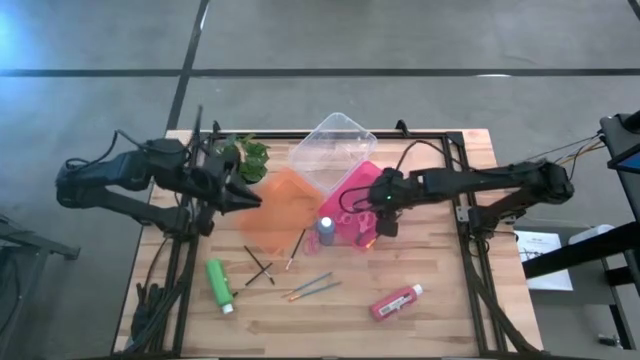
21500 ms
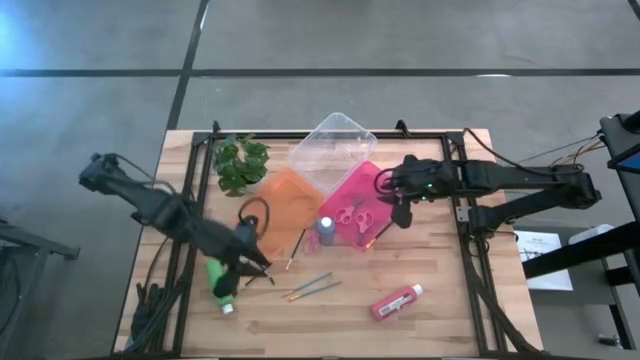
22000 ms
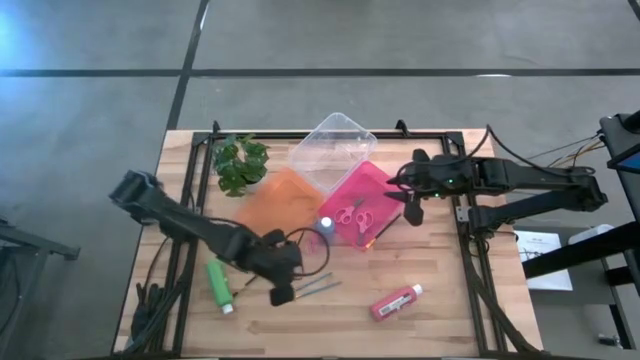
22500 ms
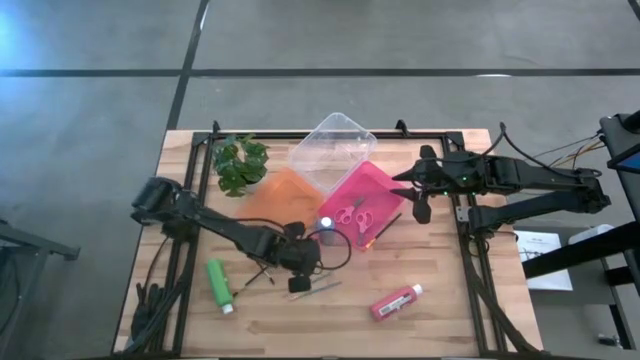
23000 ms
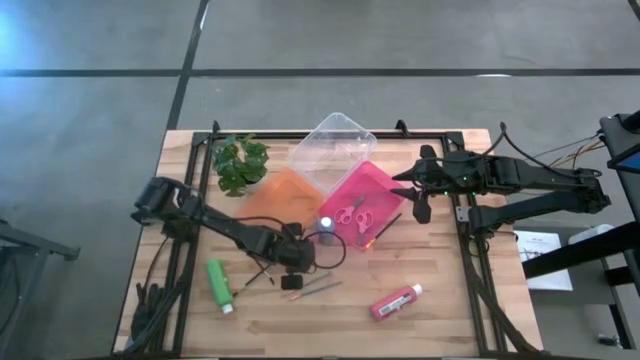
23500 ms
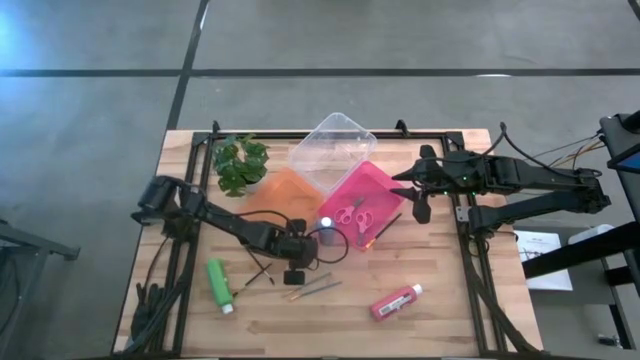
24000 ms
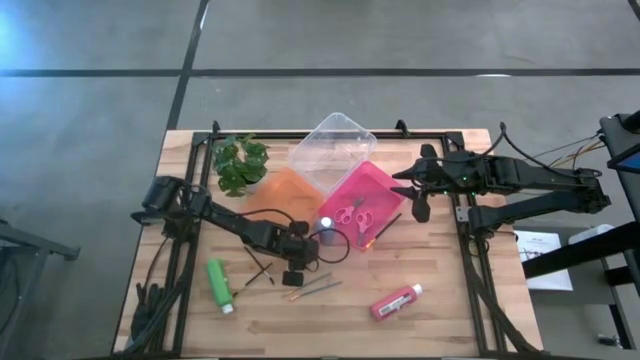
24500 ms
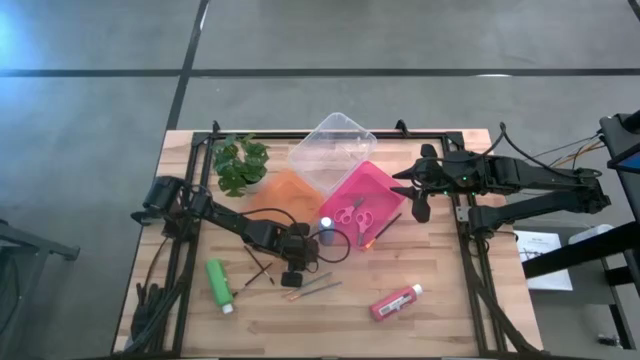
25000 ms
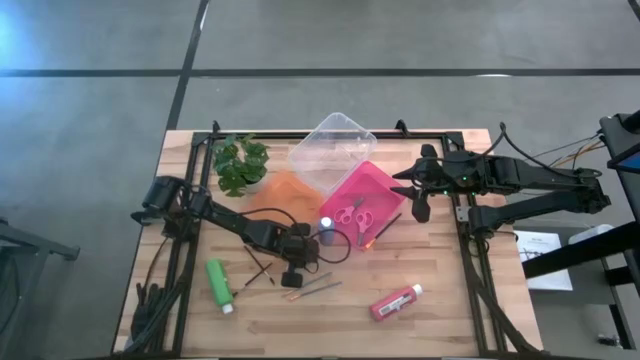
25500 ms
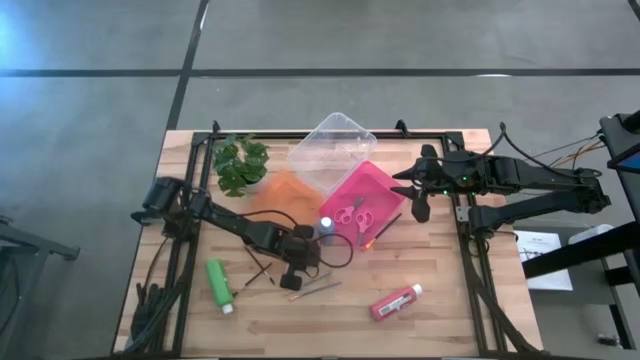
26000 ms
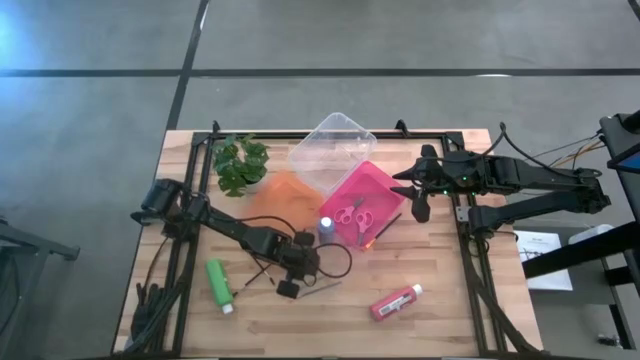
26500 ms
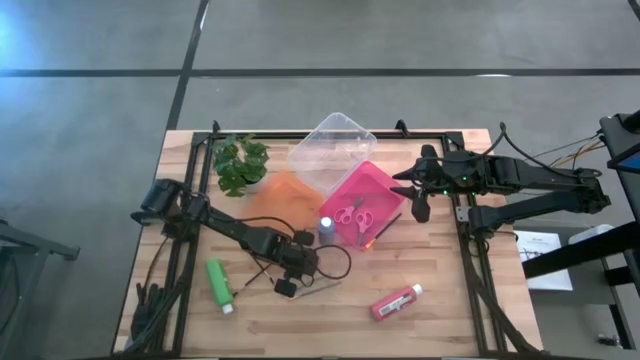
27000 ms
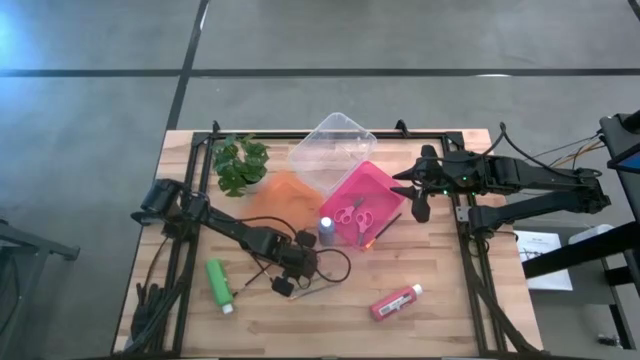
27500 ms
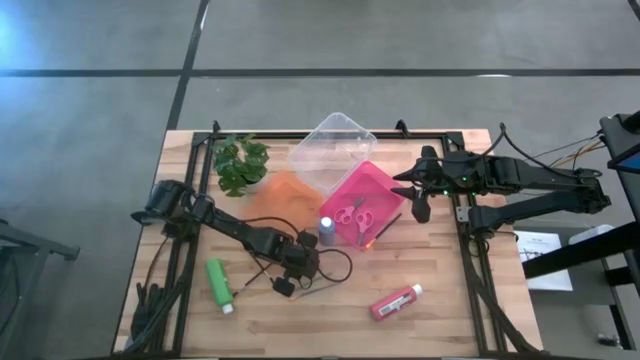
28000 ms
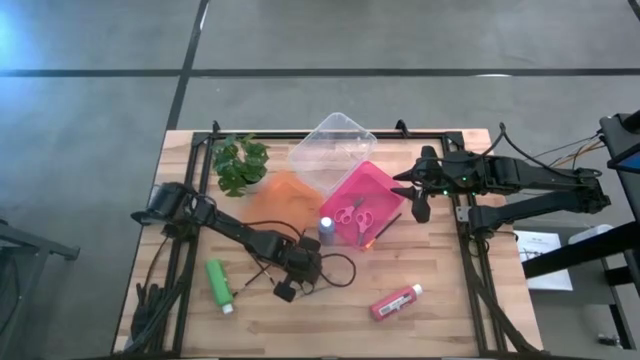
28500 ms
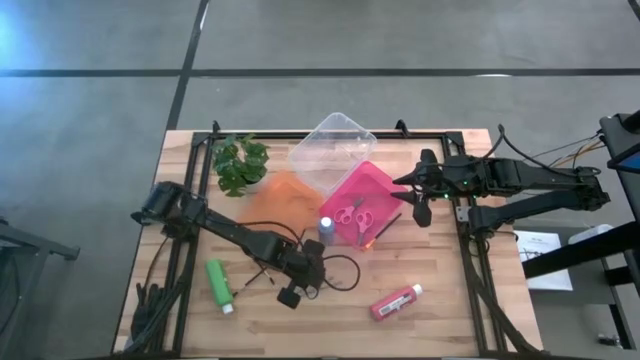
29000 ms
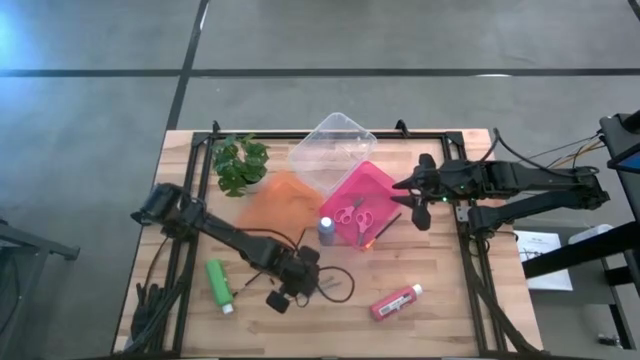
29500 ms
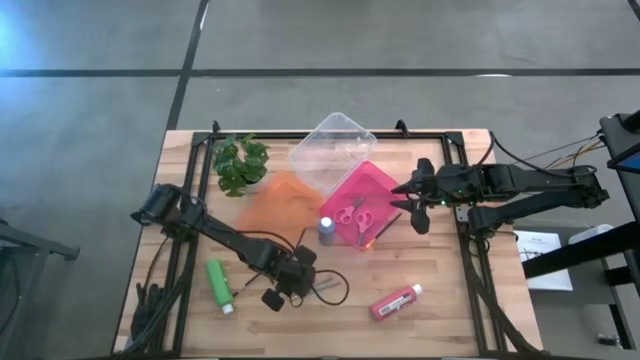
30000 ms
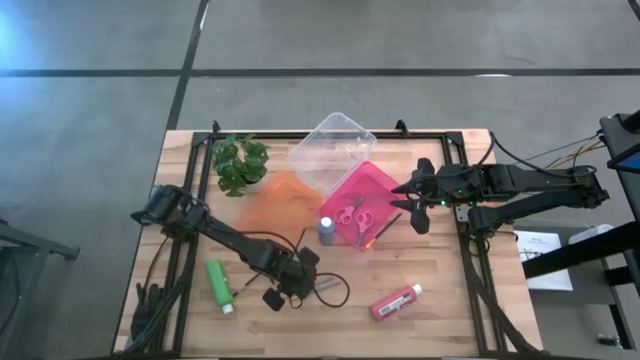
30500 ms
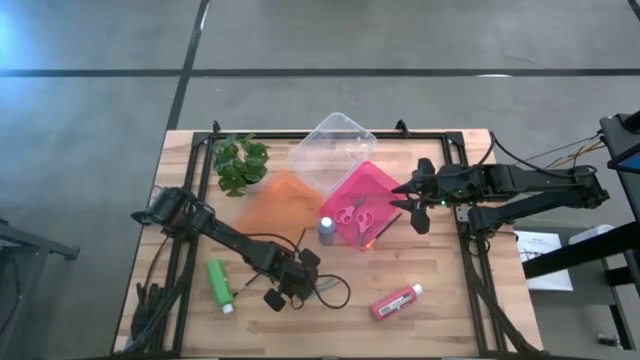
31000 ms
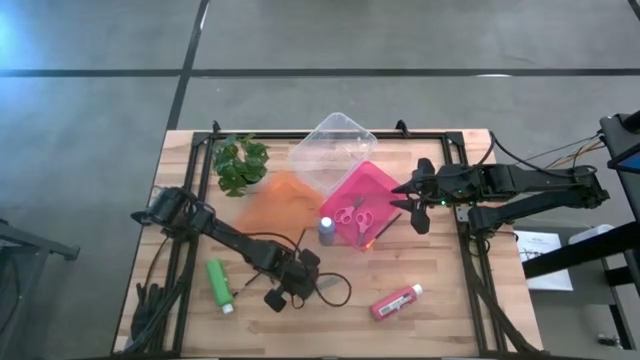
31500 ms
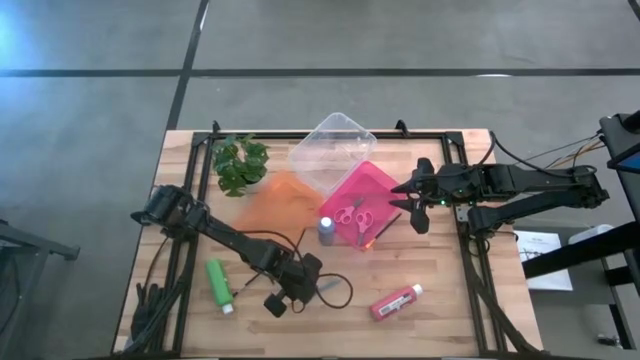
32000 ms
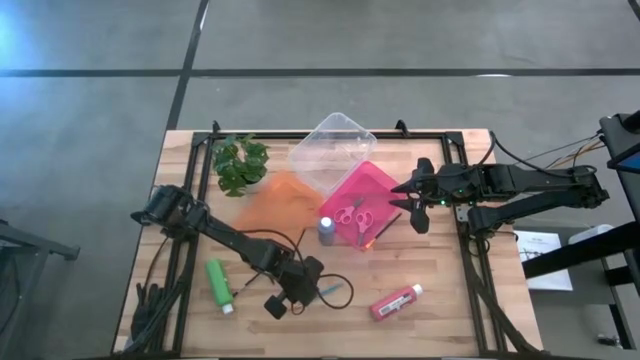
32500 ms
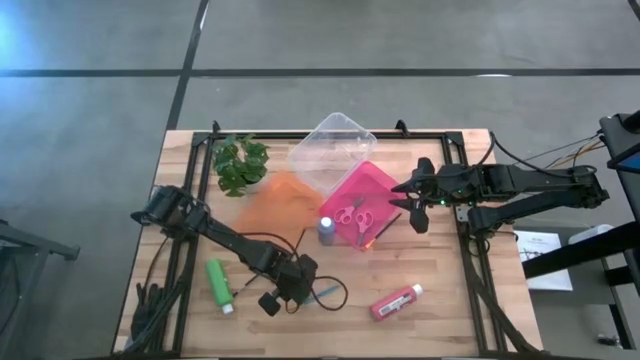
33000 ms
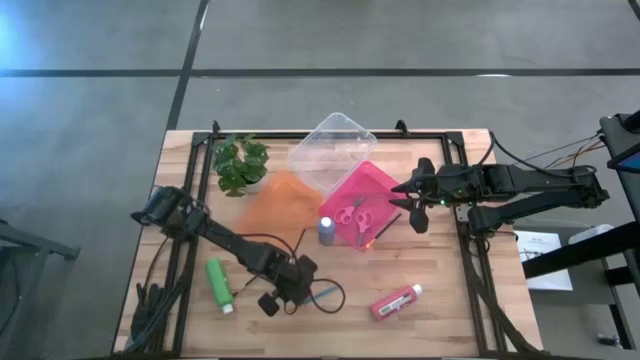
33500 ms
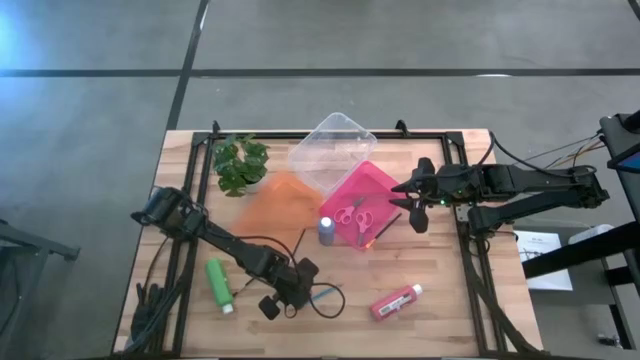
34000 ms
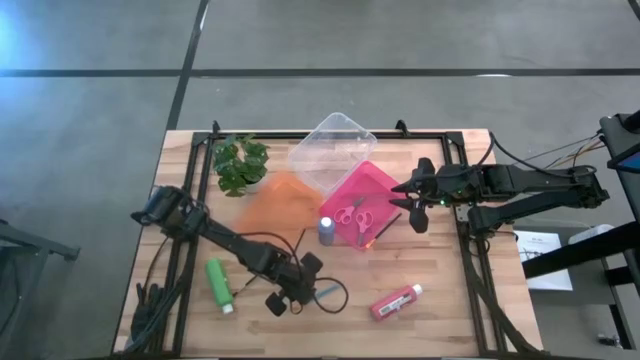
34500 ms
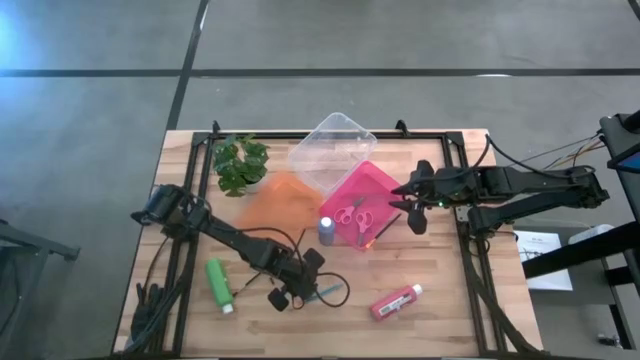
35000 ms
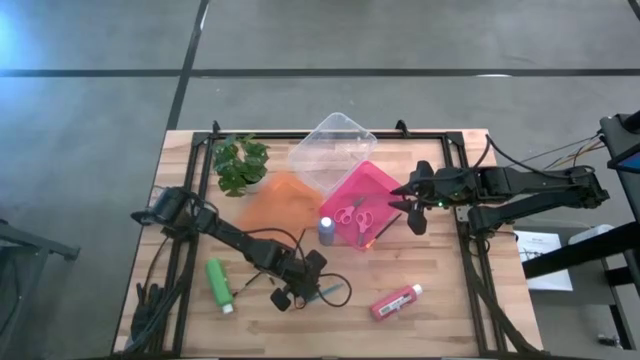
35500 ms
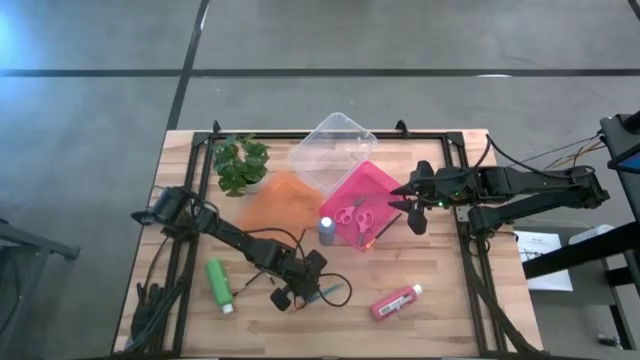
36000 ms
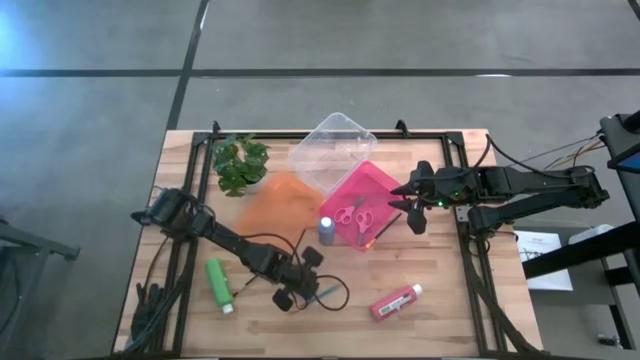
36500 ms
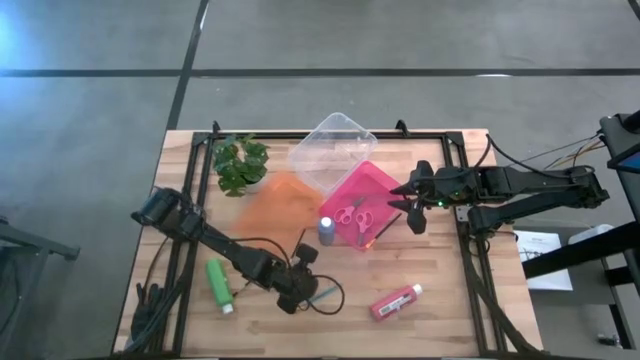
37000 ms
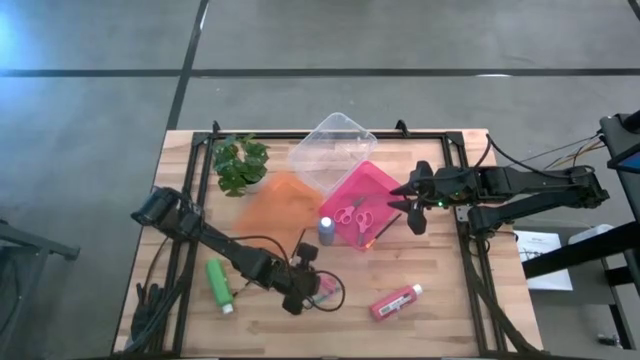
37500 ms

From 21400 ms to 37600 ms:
Task: Pick & Place Paint Supplies
Put the pink scissors into the pink bin

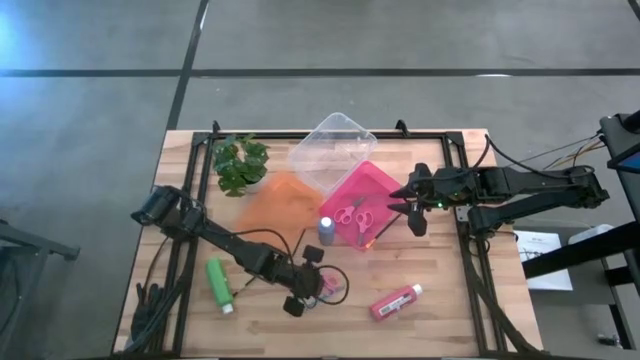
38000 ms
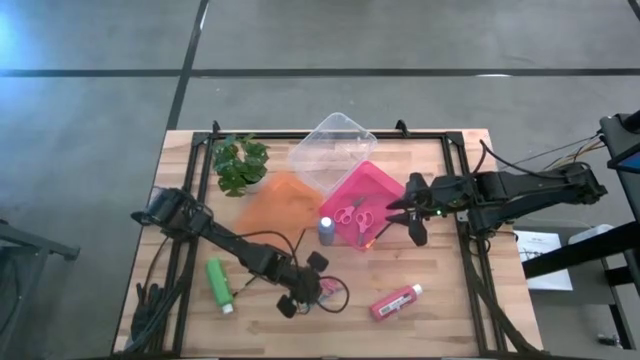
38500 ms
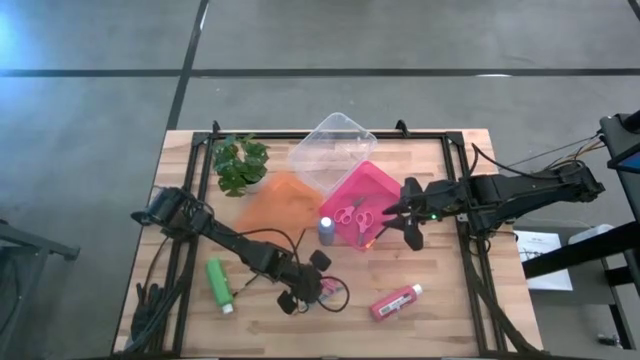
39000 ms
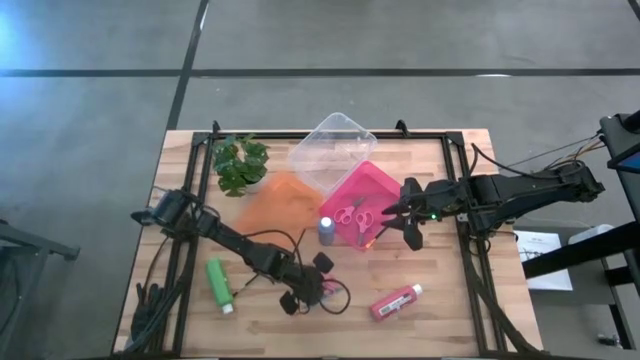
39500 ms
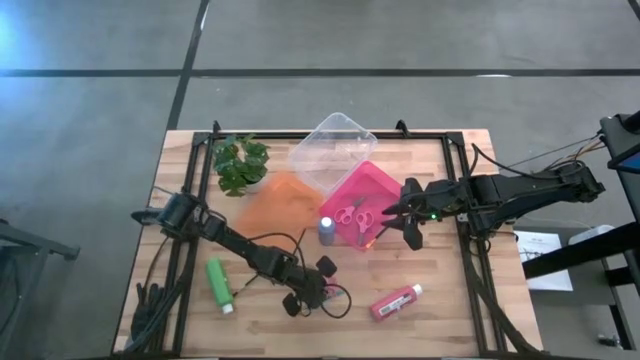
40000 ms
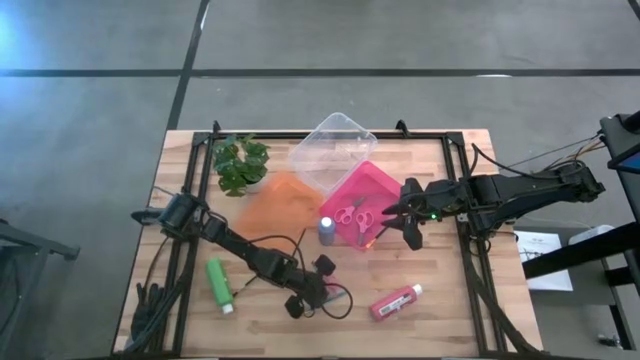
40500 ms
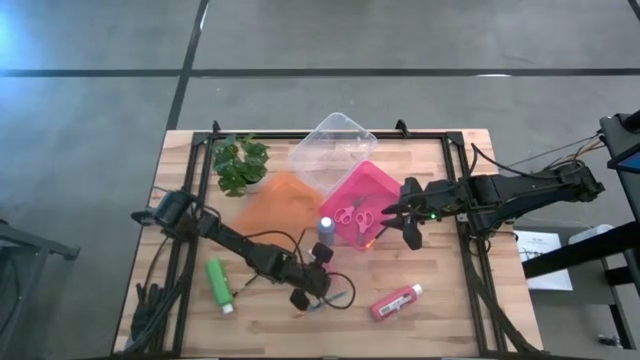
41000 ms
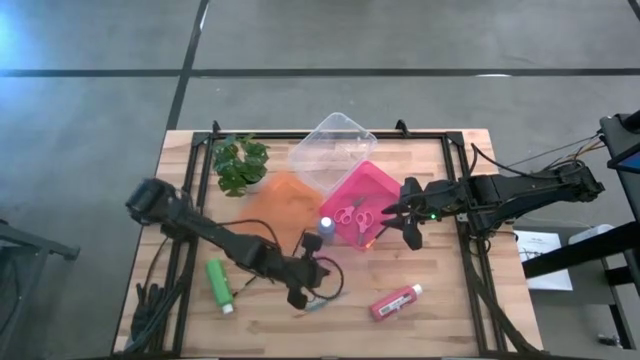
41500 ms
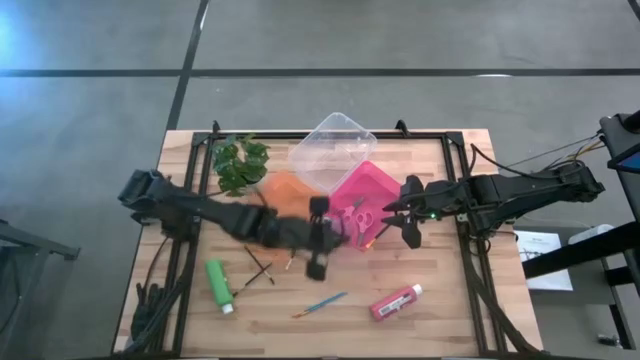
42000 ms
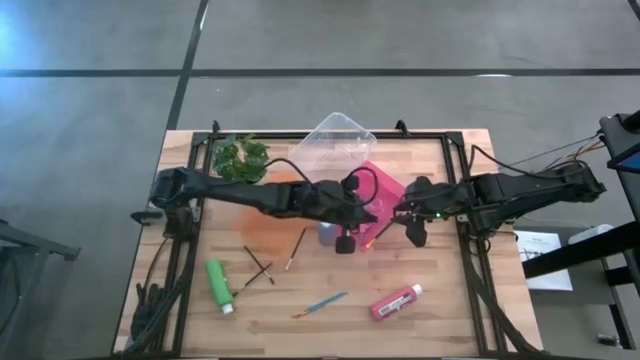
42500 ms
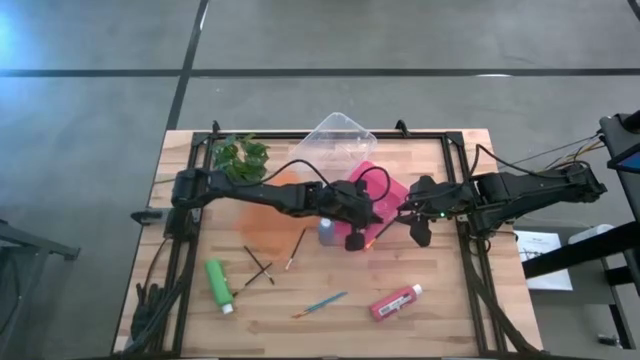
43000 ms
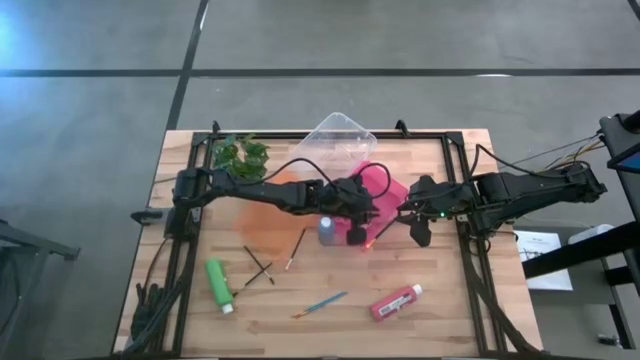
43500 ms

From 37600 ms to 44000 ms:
Put the pink scissors into the pink bin
